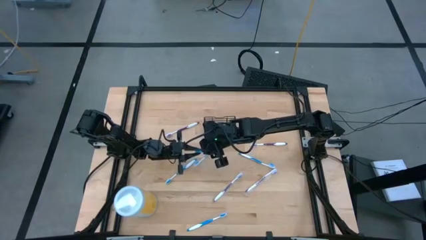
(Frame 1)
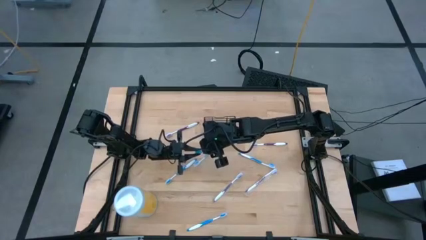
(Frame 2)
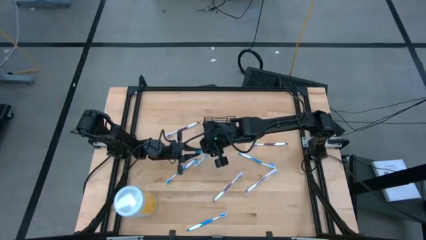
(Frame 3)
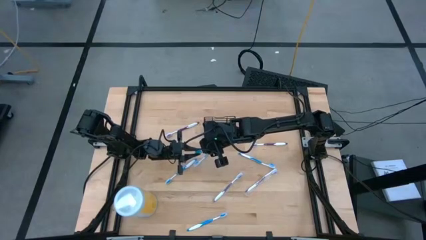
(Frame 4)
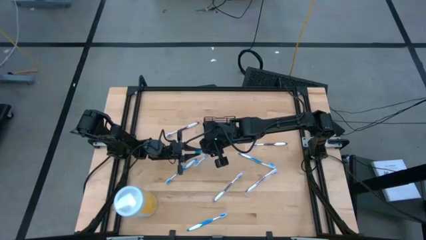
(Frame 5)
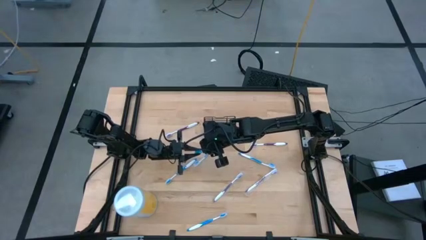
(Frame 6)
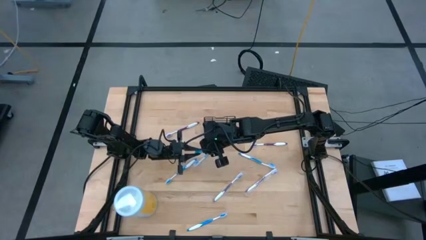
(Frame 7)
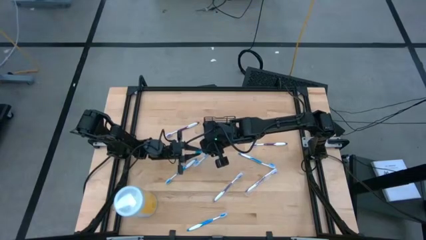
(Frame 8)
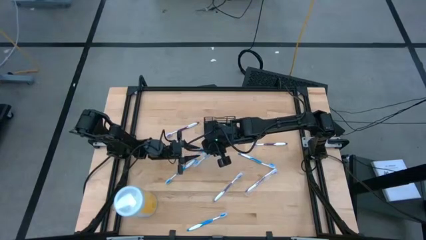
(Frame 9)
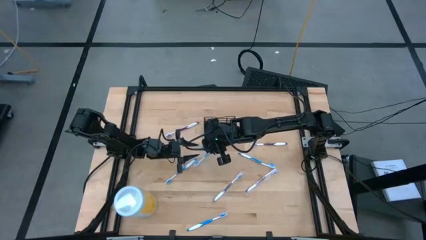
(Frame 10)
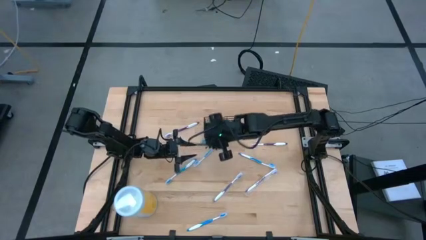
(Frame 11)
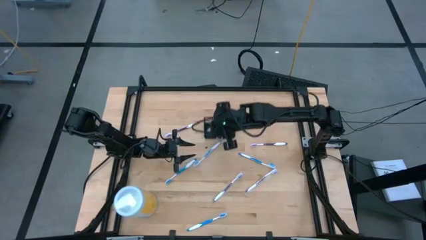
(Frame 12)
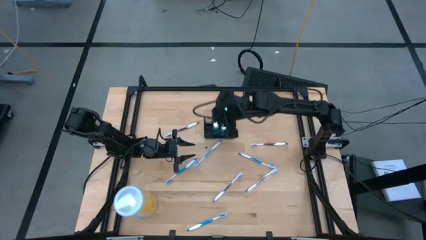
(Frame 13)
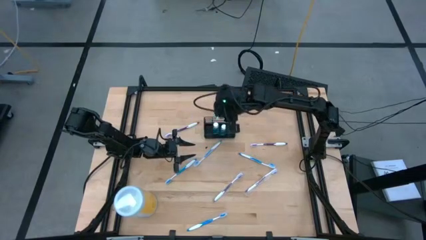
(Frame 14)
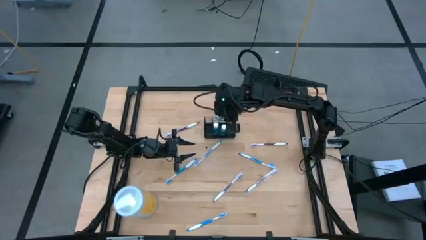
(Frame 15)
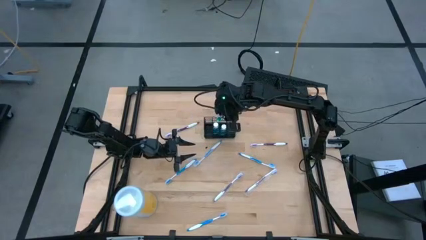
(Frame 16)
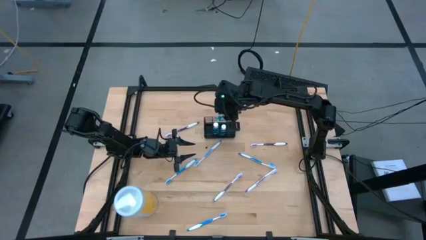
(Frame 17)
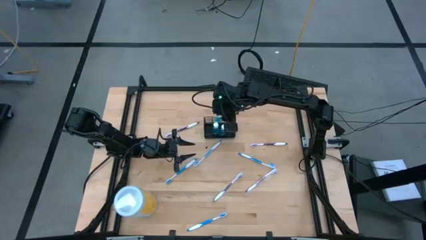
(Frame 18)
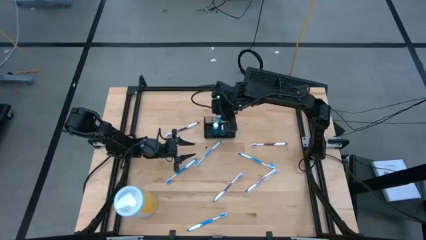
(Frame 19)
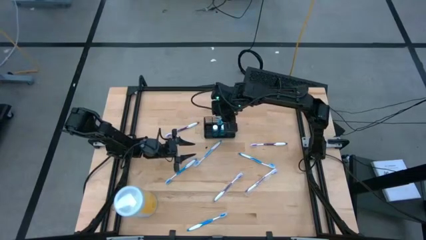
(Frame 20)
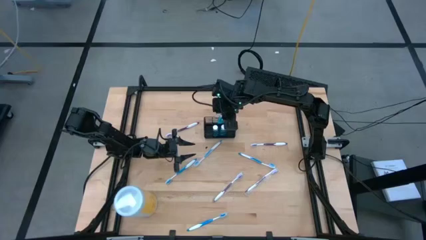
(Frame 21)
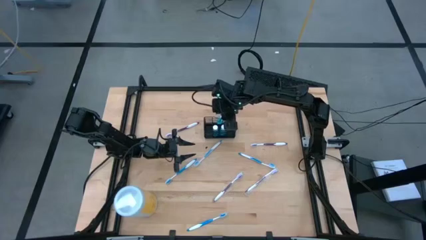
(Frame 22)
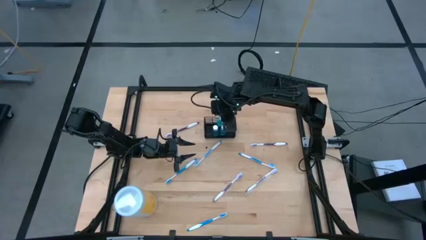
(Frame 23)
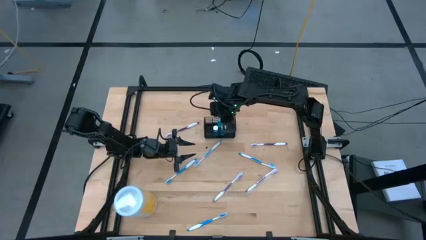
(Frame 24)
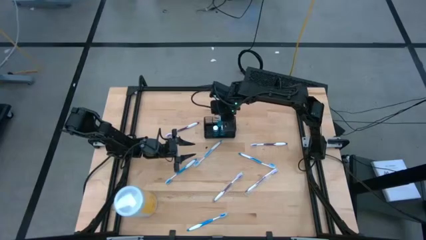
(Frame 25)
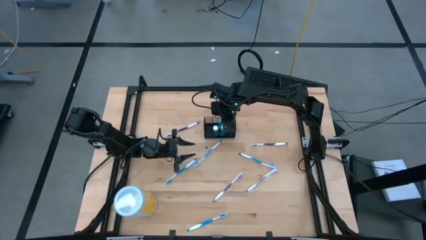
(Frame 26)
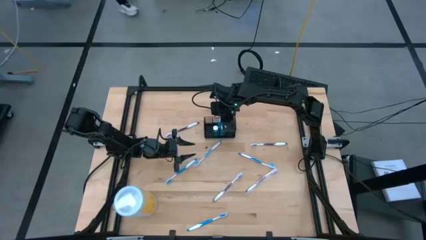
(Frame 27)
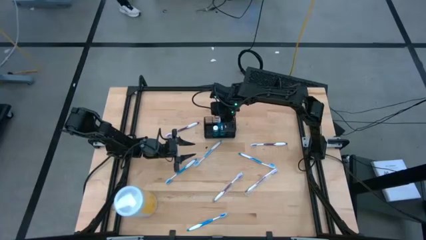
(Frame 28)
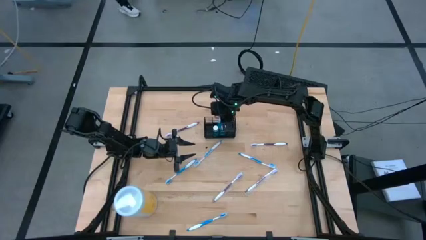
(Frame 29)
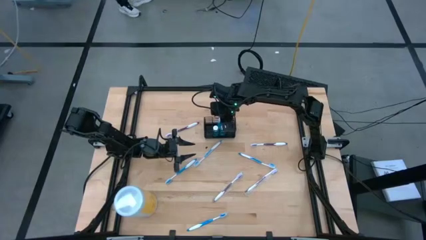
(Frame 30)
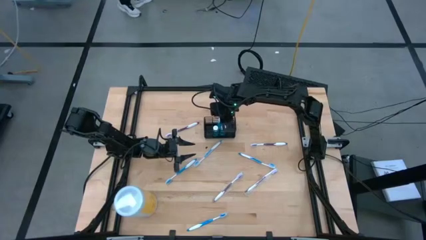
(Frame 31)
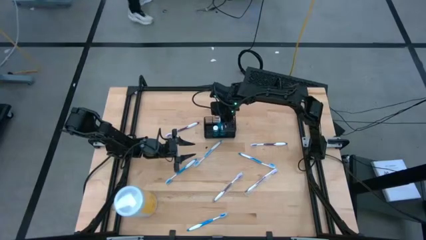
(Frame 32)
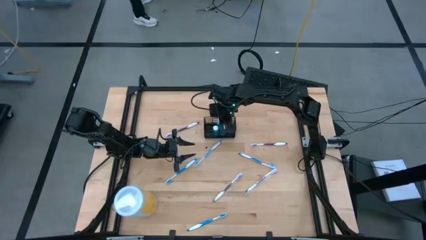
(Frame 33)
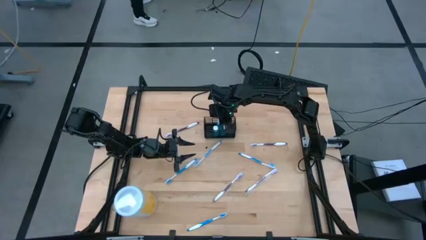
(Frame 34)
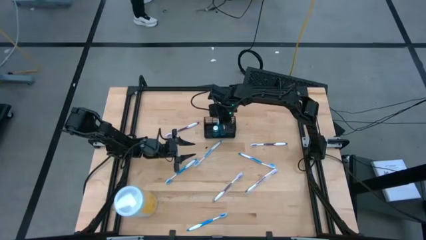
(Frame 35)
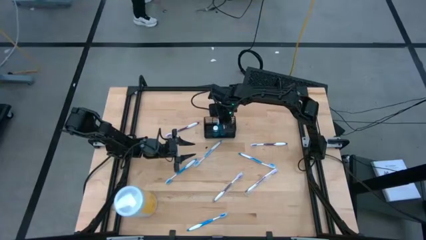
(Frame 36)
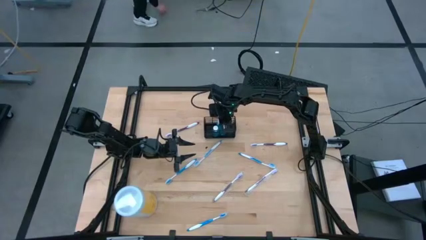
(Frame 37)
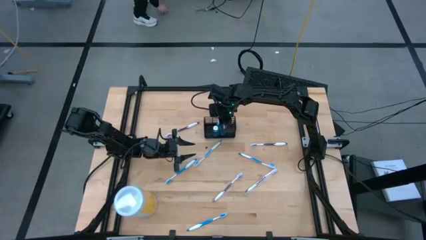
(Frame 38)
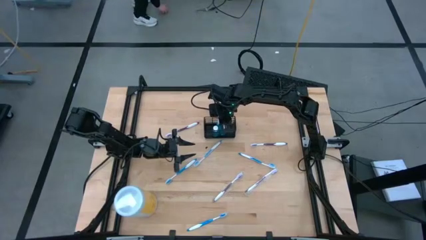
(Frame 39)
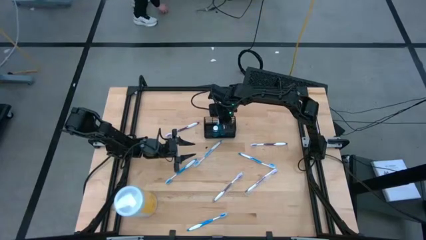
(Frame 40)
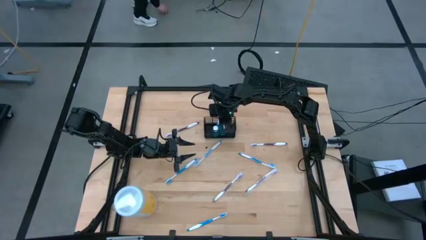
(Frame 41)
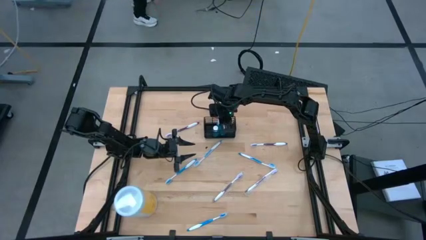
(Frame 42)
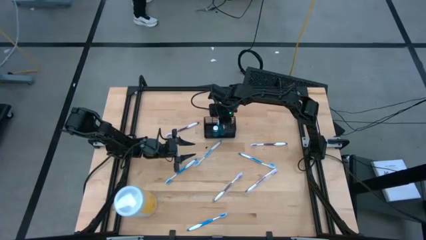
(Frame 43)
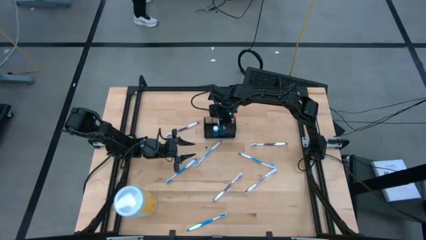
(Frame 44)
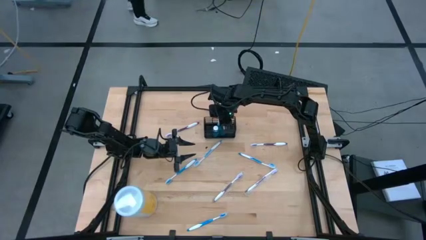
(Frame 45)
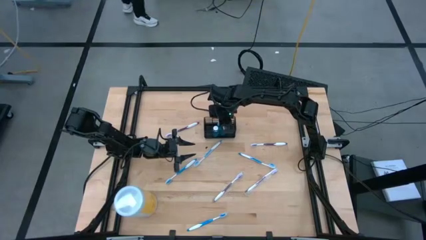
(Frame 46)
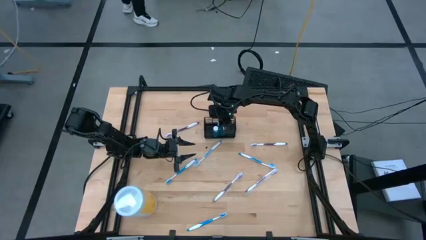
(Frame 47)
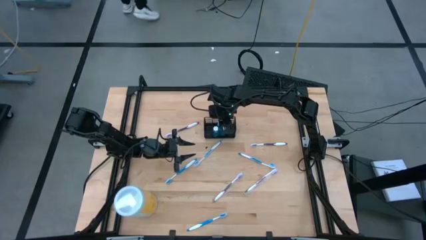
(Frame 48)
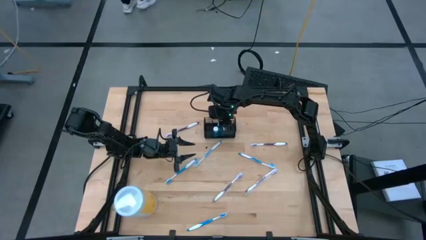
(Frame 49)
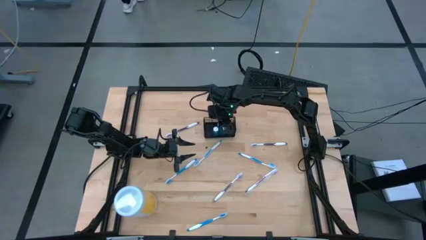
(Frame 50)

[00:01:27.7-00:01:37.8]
Task: Pick & Place toothbrushing station
Put the blue mouthwash bottle into the black organizer

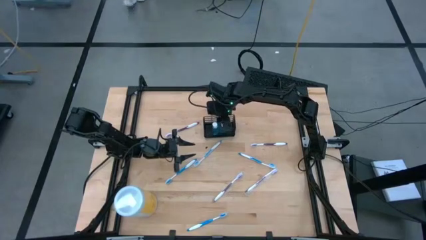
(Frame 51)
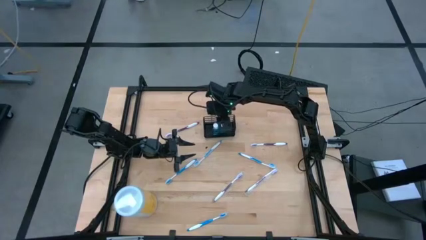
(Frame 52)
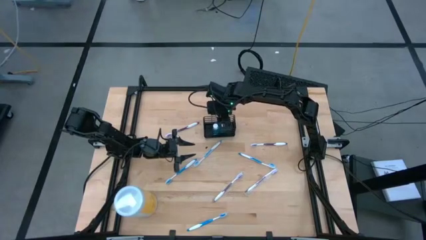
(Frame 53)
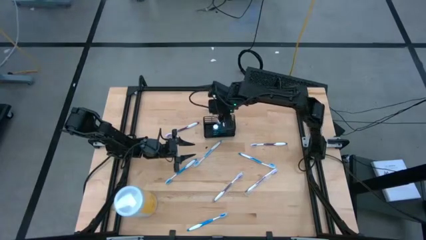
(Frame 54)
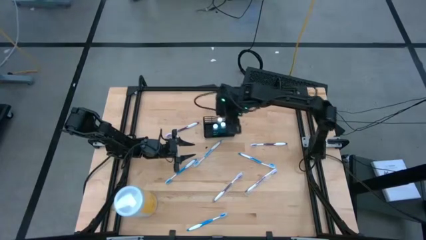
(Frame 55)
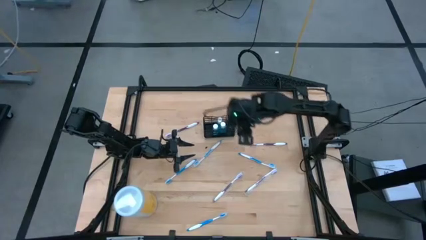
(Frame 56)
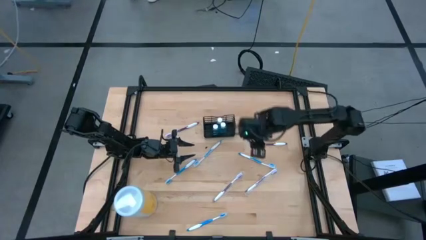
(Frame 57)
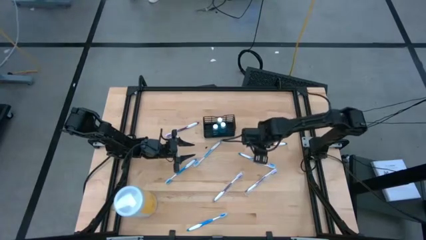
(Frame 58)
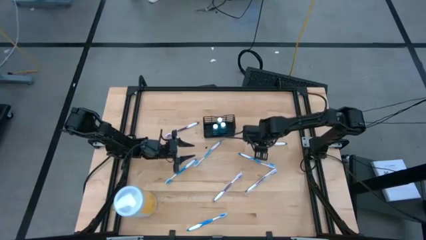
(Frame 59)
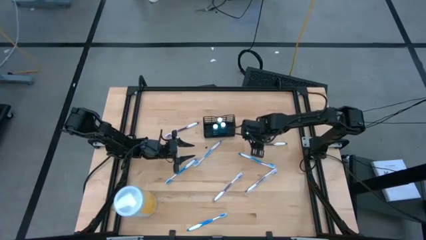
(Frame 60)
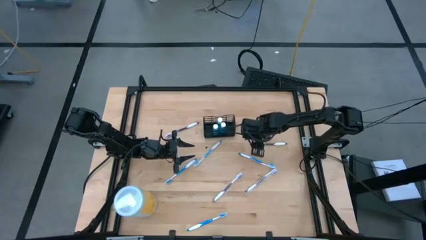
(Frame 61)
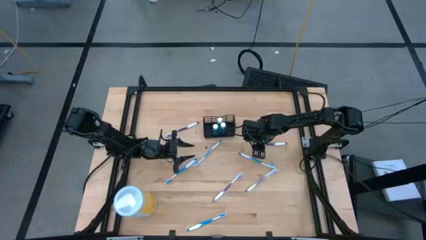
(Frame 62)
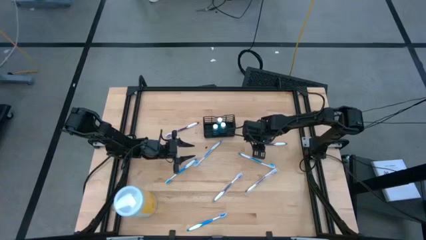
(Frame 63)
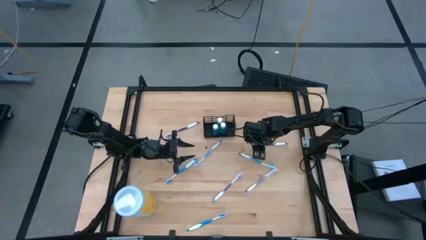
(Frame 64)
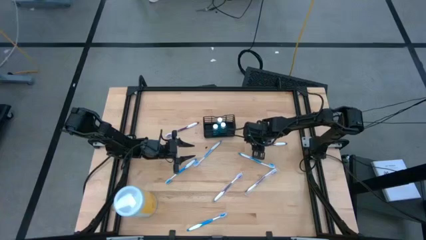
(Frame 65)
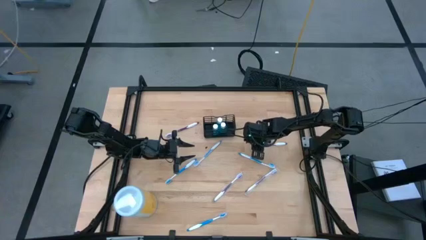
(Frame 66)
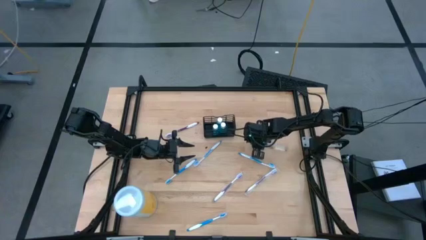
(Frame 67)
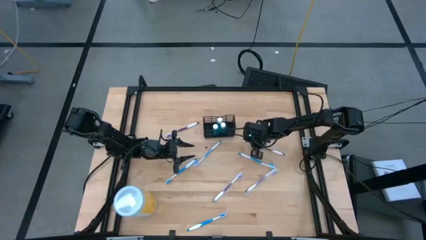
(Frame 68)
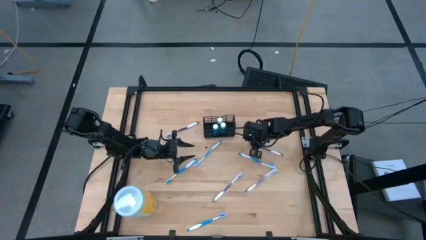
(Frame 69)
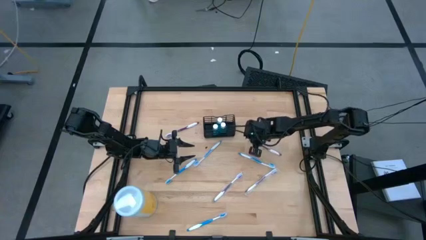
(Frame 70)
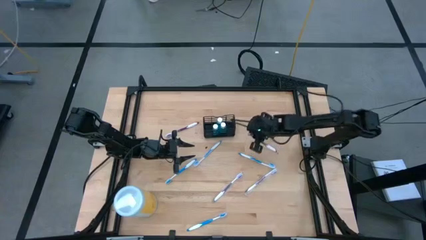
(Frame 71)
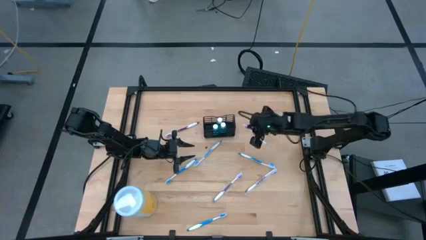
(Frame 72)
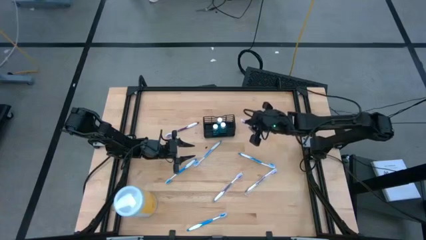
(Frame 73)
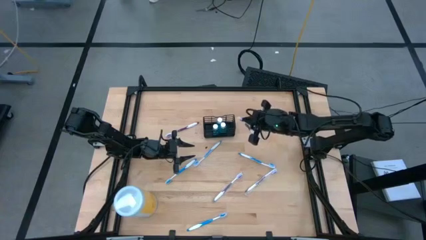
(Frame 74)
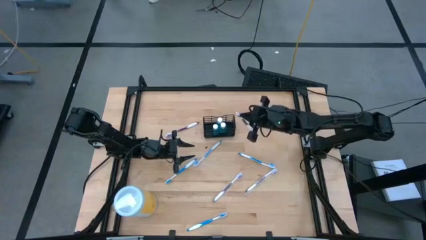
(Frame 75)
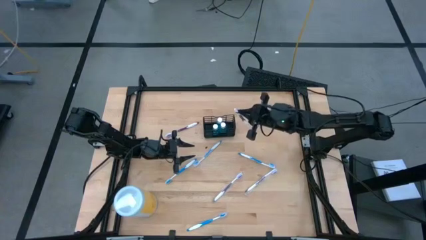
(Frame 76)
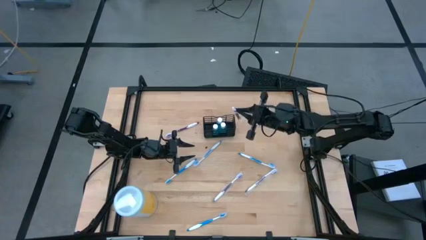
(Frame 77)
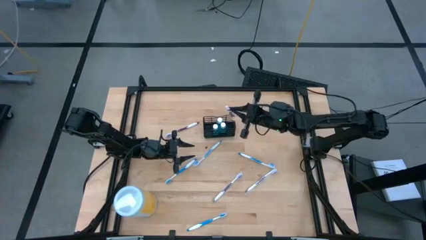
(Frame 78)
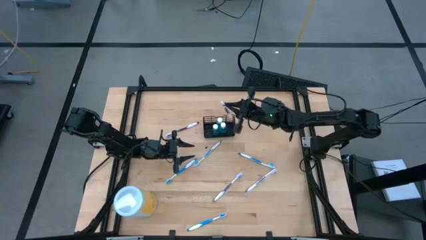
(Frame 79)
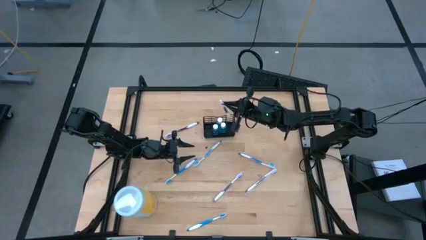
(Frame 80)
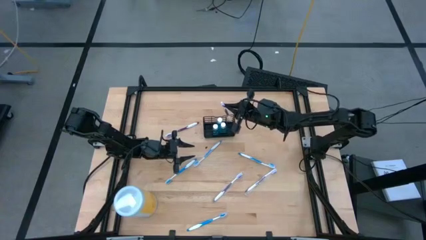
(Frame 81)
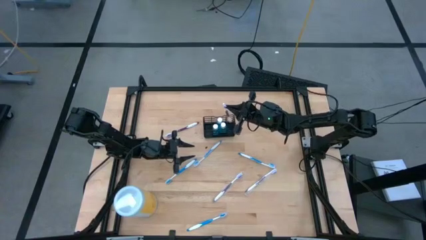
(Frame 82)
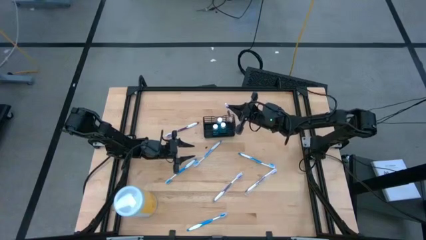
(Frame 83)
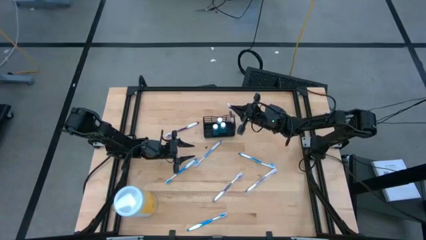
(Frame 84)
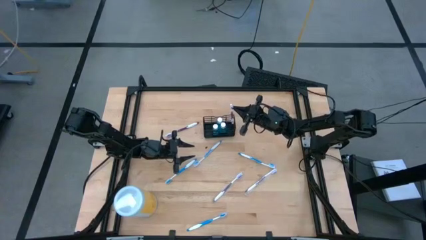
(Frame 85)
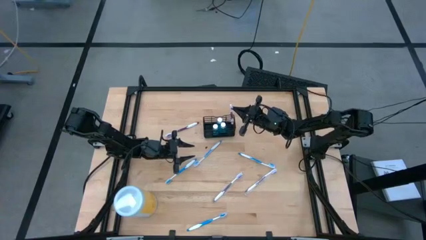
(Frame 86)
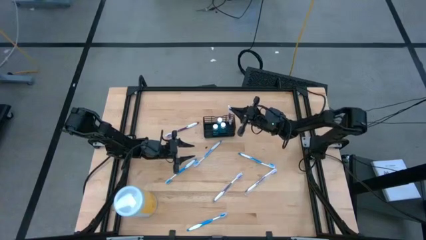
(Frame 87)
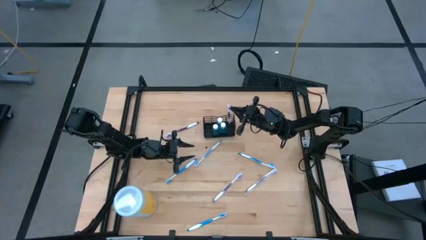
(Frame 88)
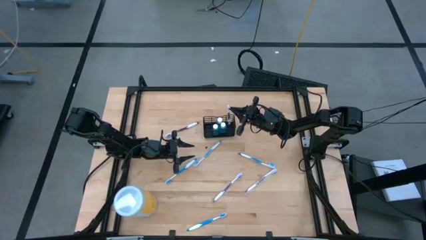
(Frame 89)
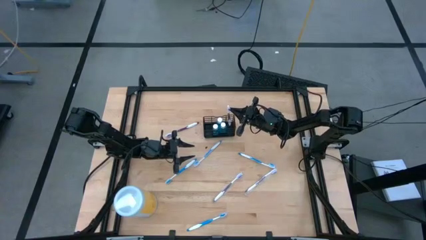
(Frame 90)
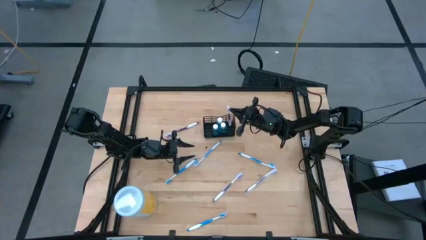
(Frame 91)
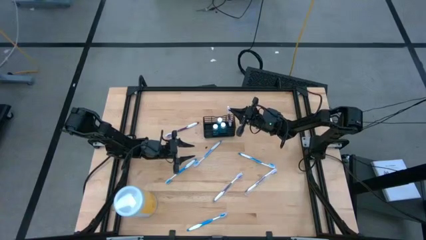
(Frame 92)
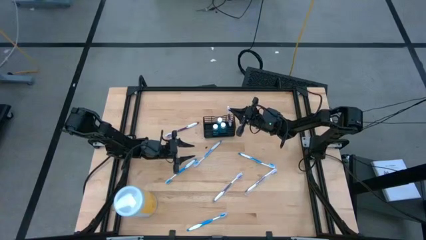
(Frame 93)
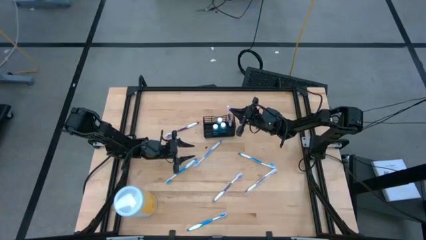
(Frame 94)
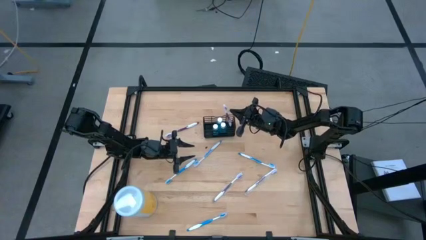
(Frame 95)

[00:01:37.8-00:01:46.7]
Put the purple toothbrush into the black organizer
